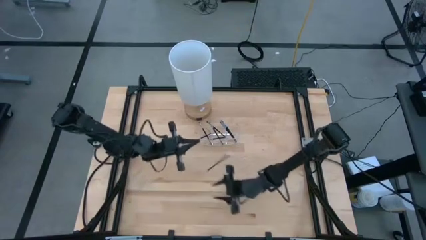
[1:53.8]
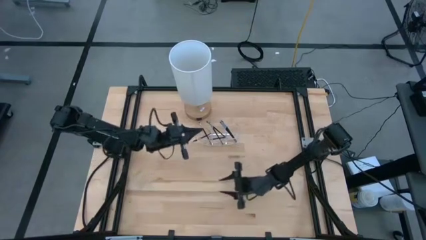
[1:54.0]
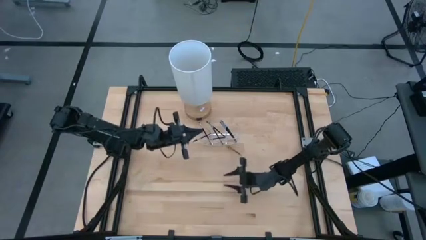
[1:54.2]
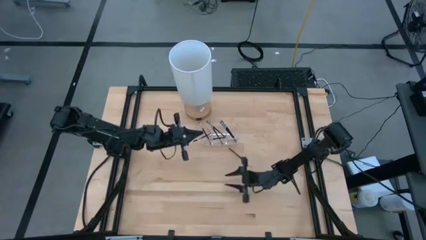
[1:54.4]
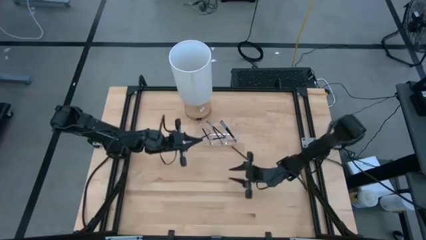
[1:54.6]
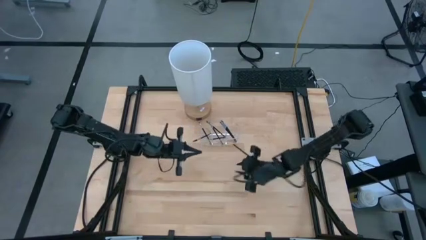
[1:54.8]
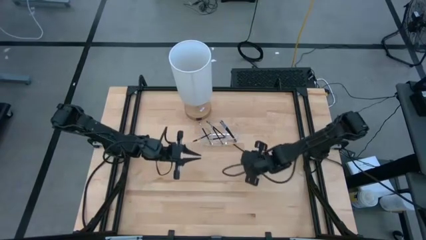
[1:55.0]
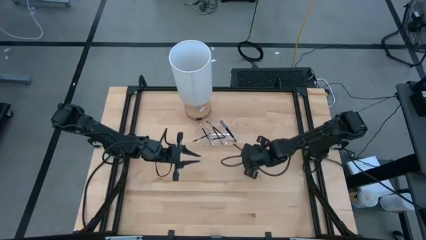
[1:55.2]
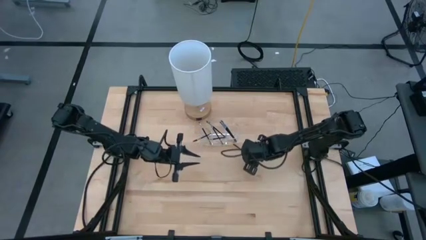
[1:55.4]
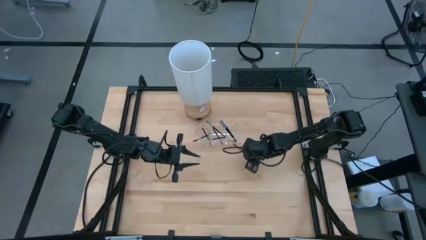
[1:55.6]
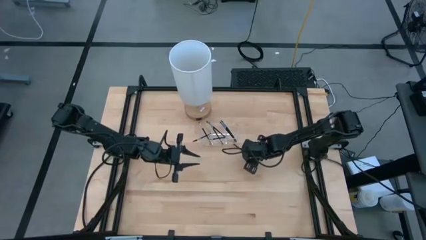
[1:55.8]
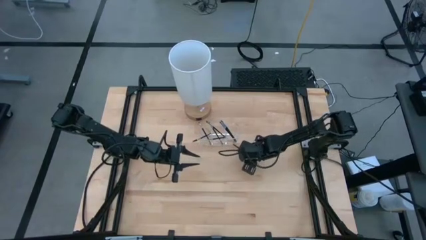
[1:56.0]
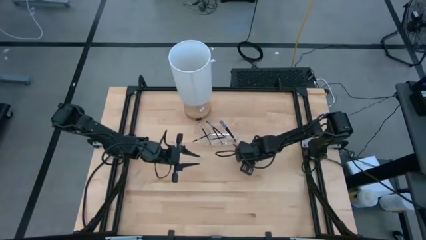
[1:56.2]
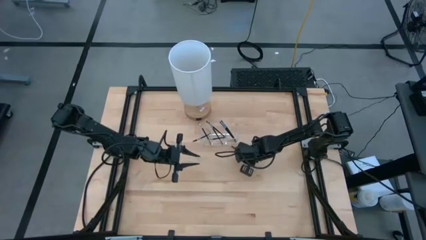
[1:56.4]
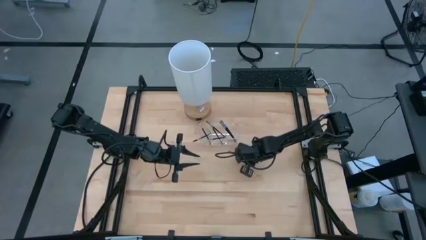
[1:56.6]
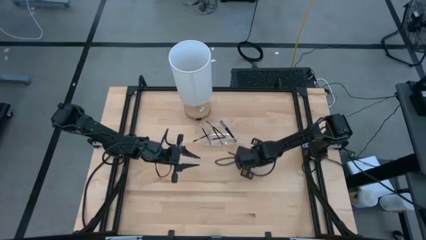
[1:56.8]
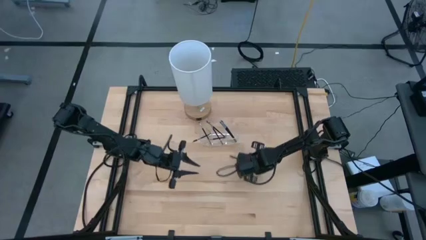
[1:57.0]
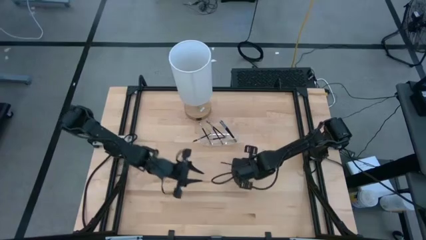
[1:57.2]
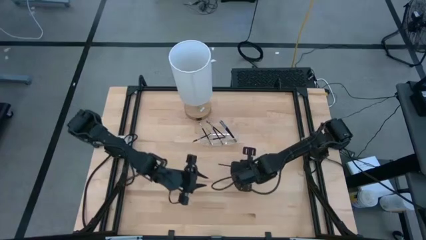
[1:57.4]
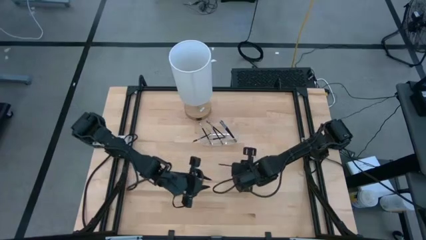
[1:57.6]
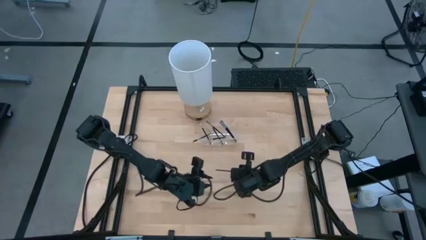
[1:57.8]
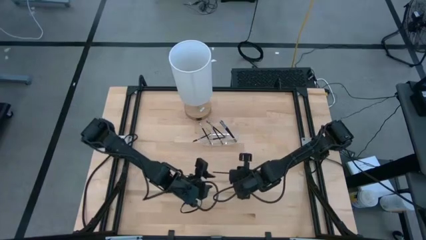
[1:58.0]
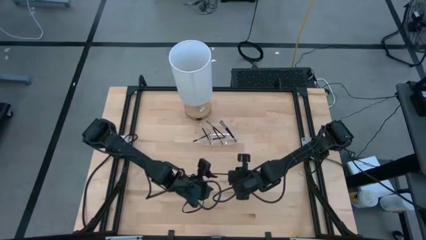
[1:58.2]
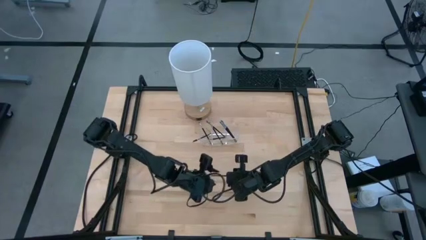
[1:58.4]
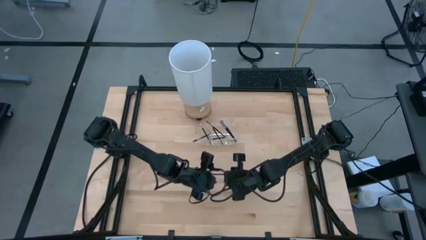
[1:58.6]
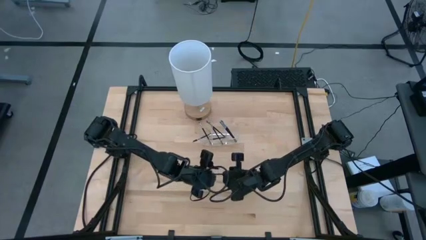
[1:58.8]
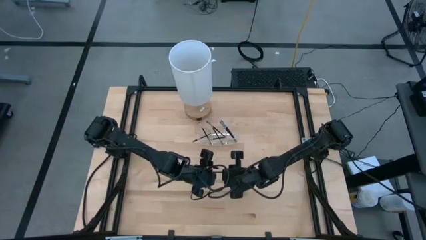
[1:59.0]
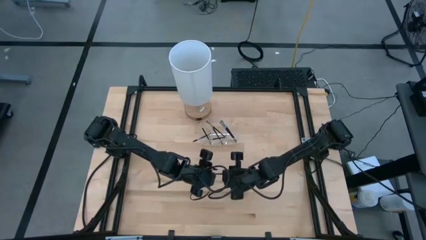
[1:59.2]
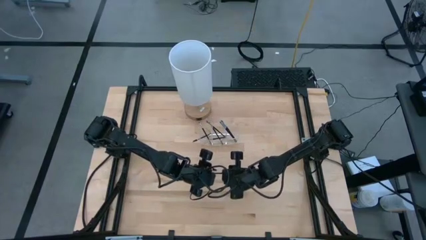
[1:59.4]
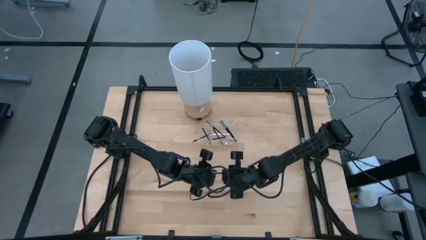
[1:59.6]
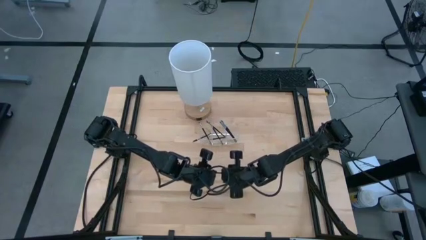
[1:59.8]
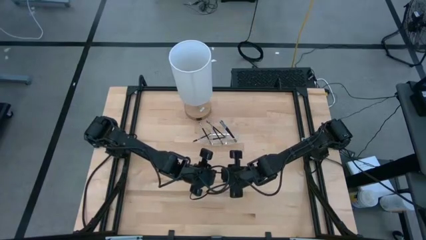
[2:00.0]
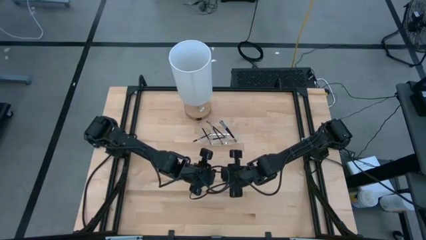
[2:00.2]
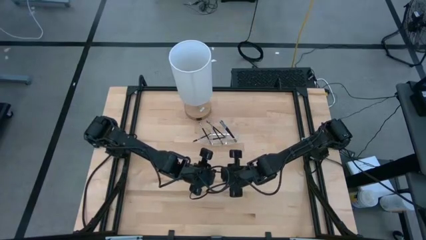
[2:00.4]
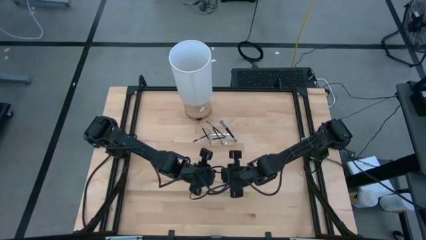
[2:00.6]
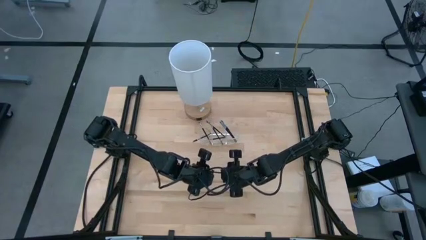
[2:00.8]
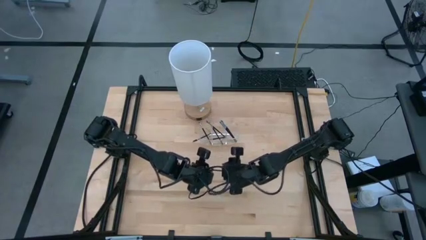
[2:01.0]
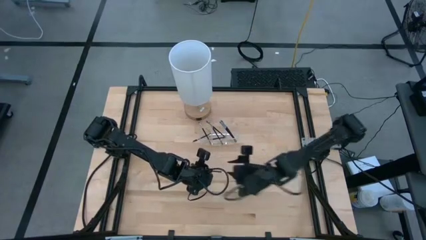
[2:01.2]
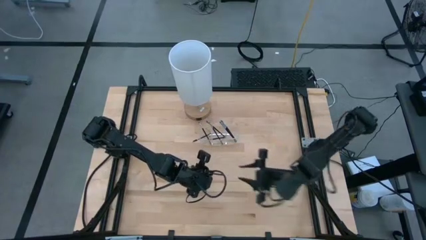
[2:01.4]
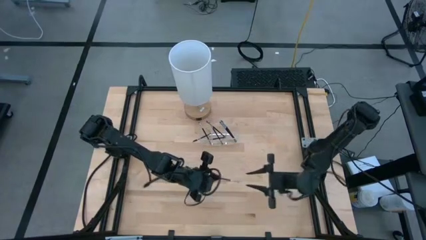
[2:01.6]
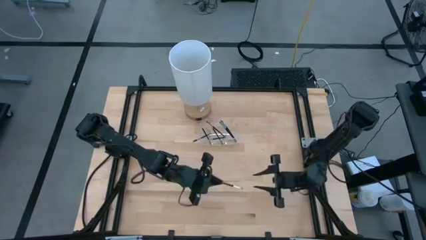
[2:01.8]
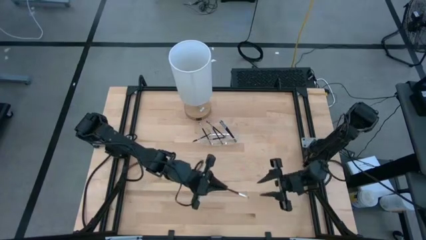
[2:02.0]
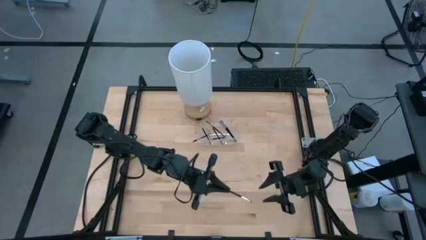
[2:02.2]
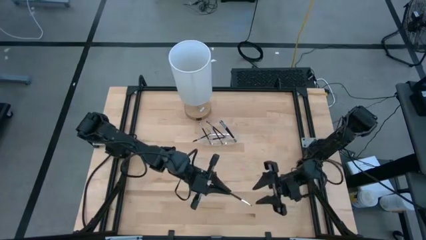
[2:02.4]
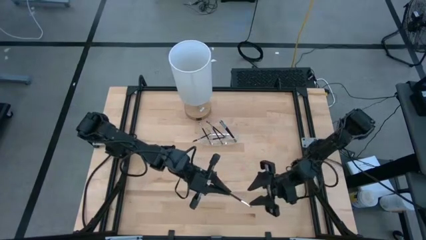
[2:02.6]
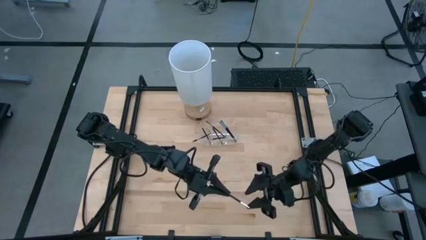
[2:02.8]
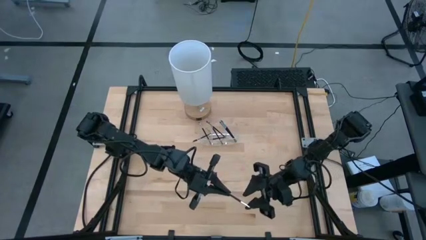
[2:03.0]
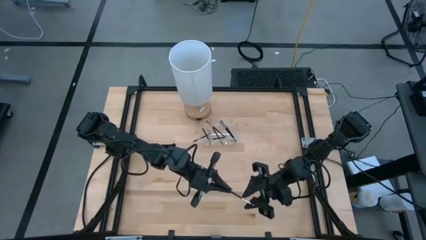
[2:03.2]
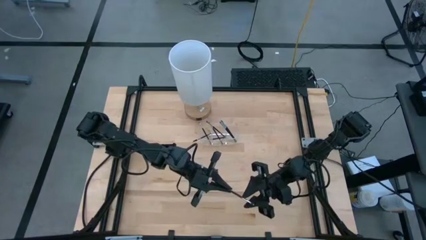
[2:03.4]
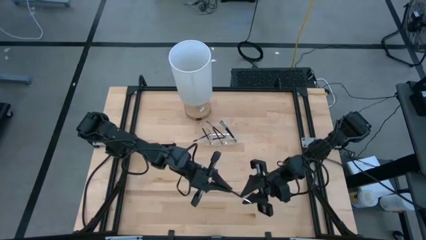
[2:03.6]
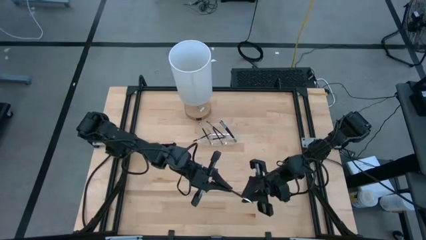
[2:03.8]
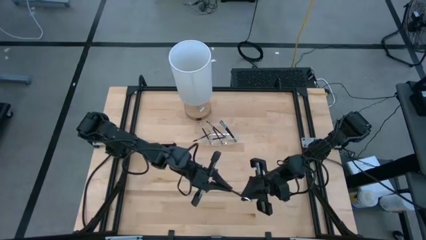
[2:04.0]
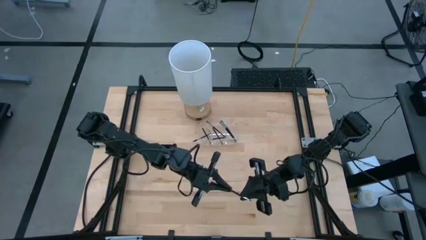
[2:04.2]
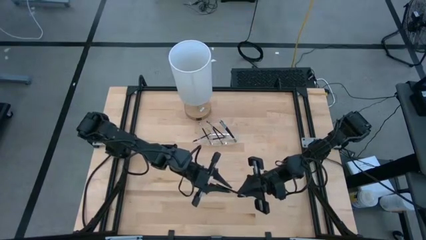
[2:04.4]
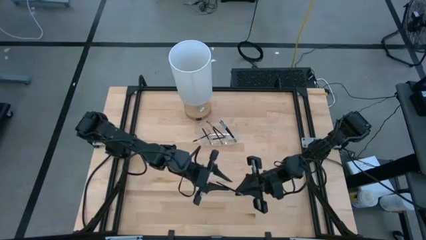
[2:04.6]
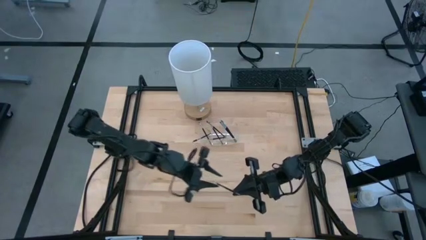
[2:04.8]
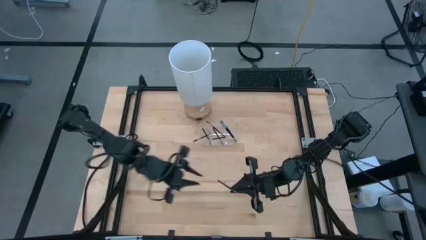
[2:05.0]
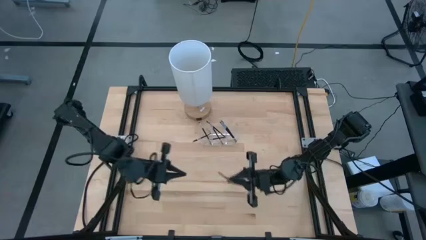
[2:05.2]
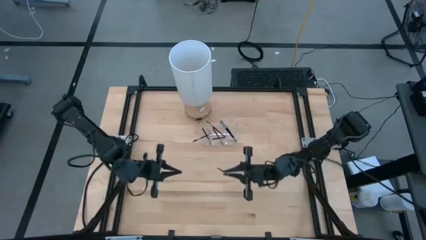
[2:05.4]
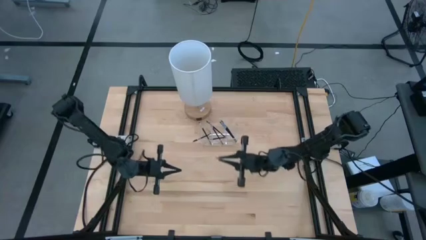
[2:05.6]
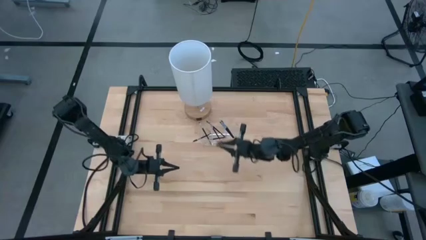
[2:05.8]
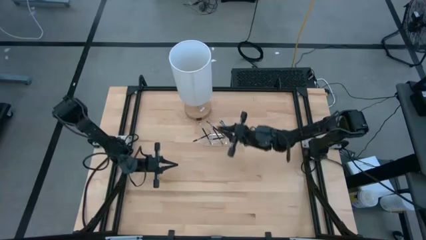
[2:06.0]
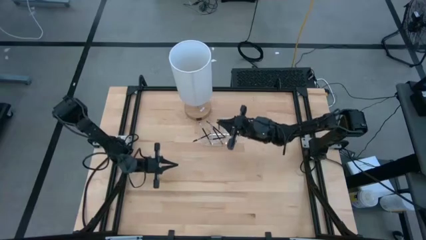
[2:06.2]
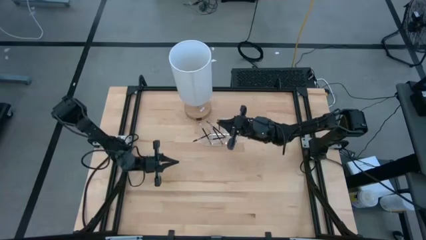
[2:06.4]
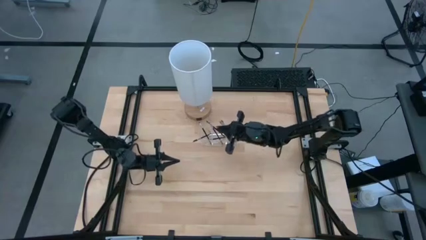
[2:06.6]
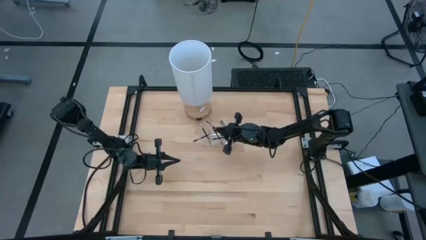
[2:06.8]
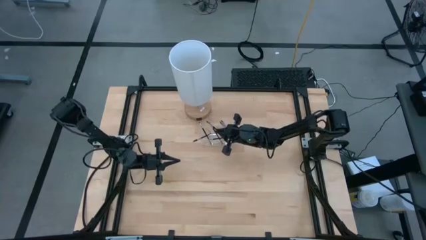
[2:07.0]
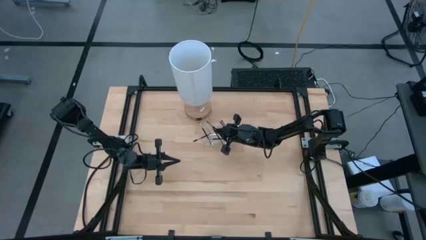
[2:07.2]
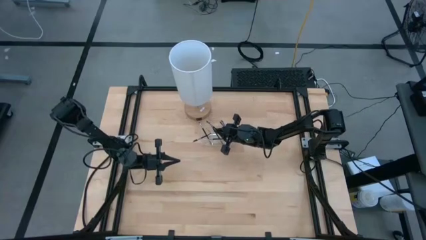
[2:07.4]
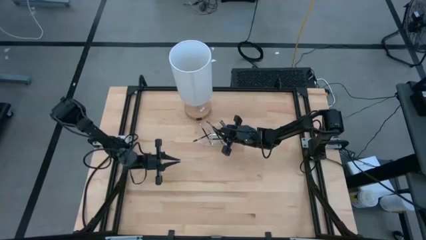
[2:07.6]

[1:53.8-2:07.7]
Task: Pick & Place Makeup Supplies
Put the makeup brush into the transparent organizer
